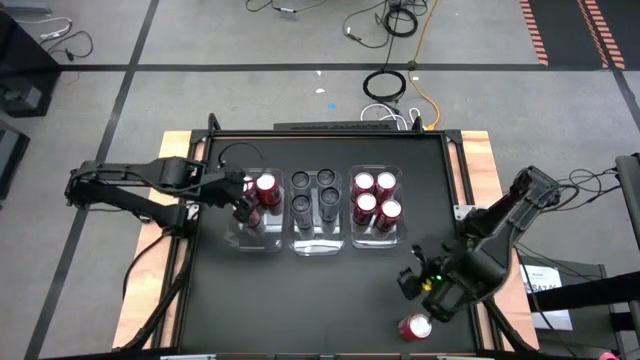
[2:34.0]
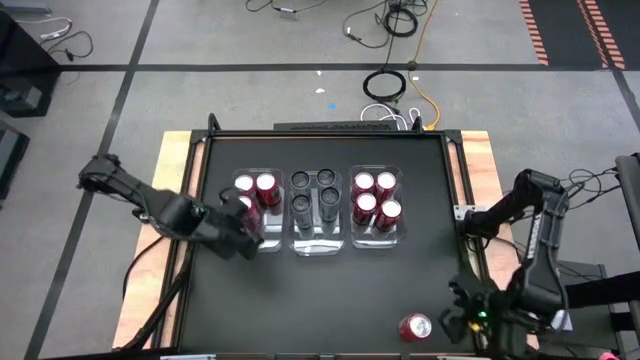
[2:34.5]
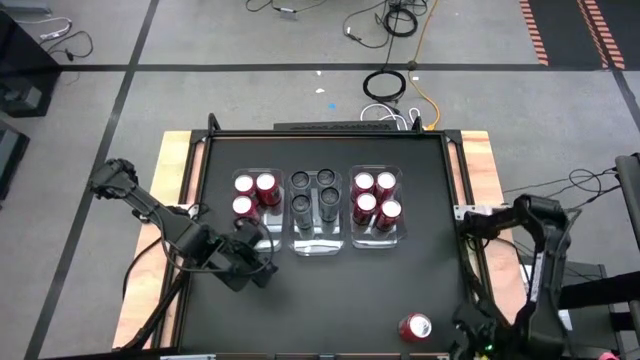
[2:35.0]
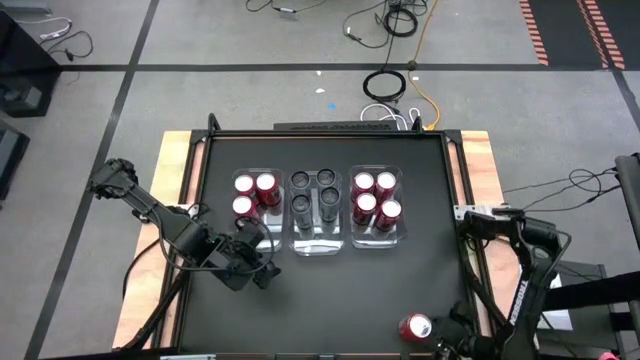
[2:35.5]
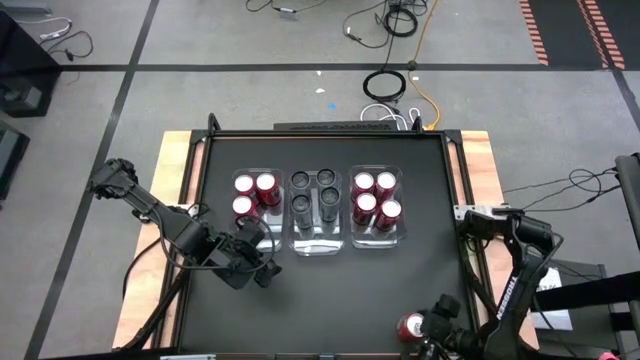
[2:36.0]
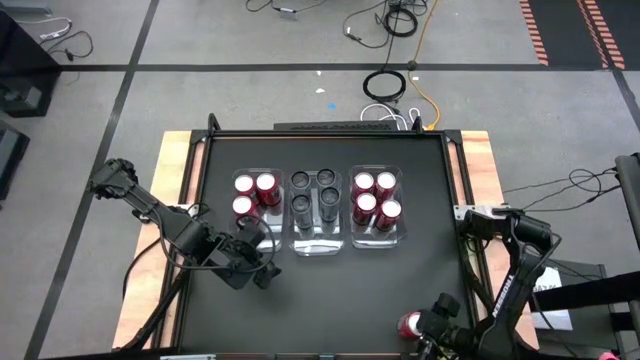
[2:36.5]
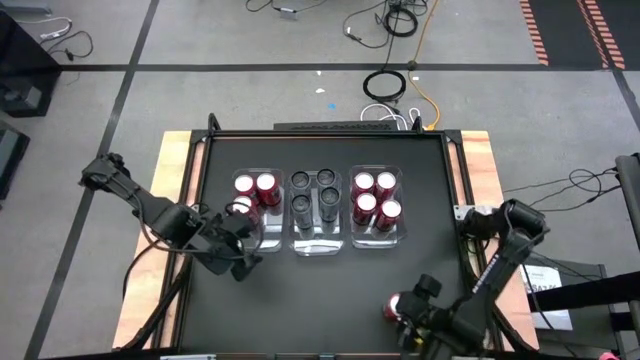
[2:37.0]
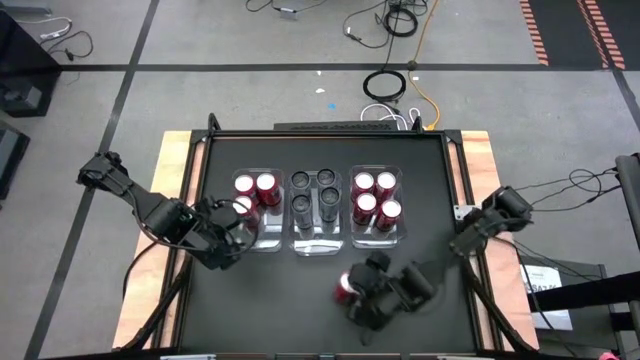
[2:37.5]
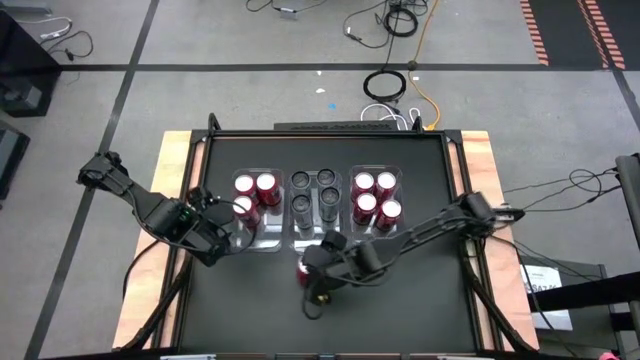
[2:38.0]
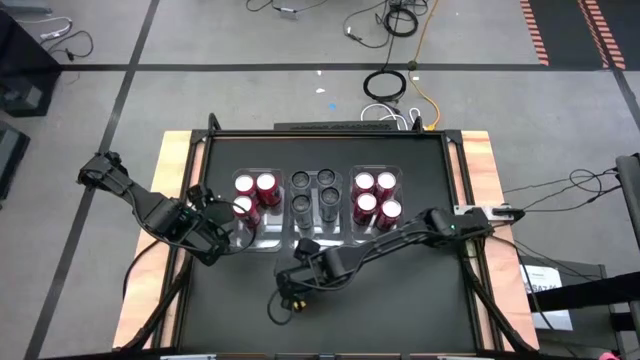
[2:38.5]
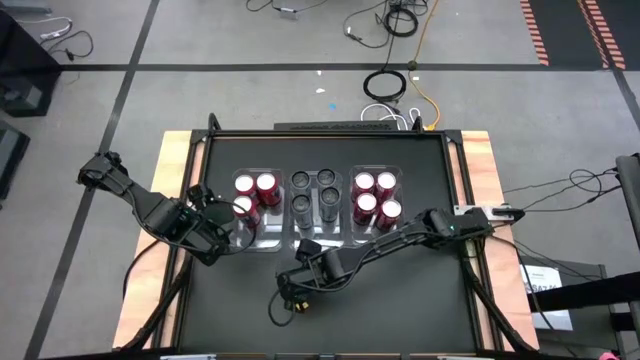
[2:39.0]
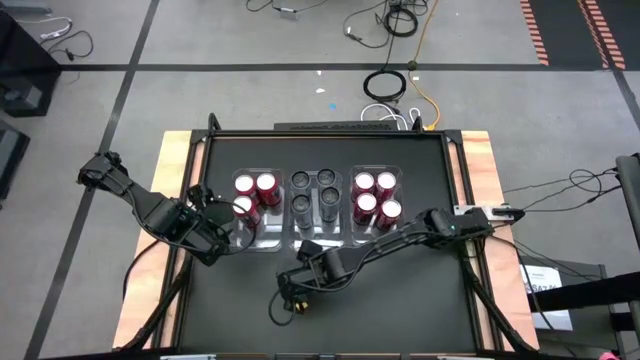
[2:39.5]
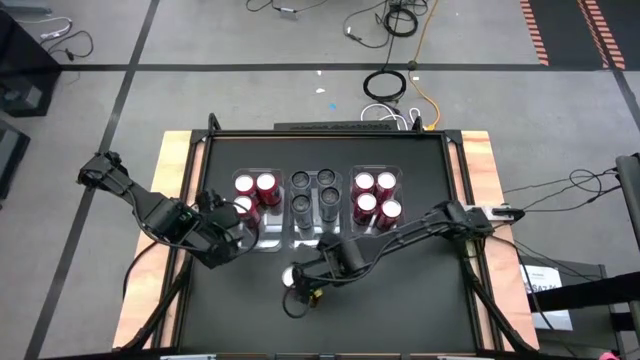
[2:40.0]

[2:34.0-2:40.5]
Task: Sort soda cans
Move the orange soda can to the center of the table

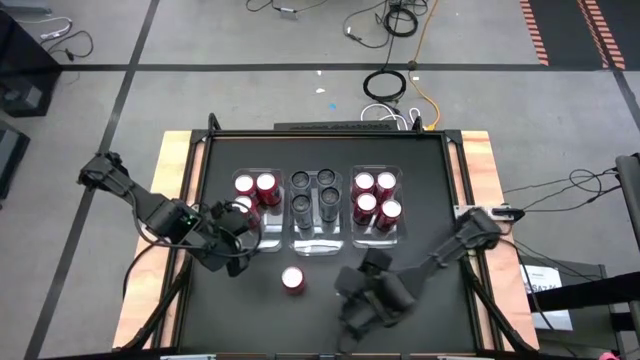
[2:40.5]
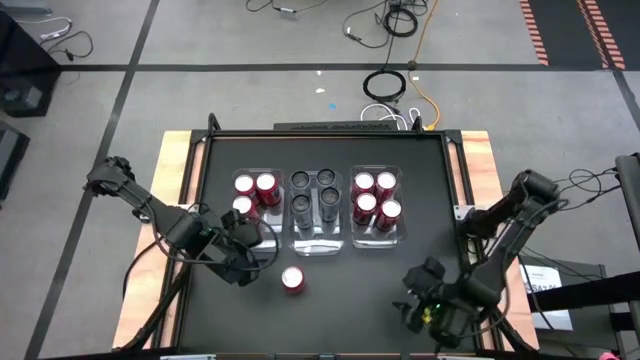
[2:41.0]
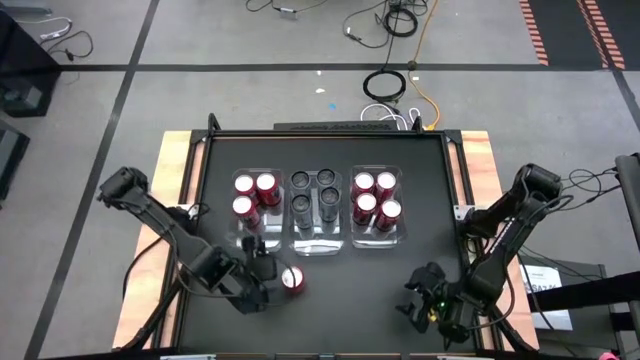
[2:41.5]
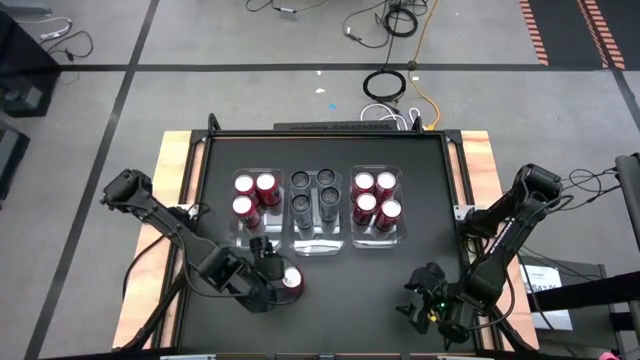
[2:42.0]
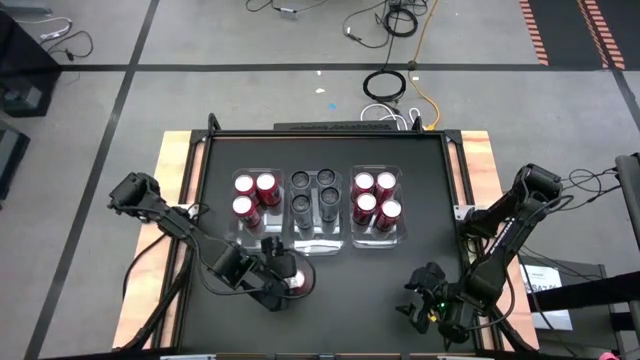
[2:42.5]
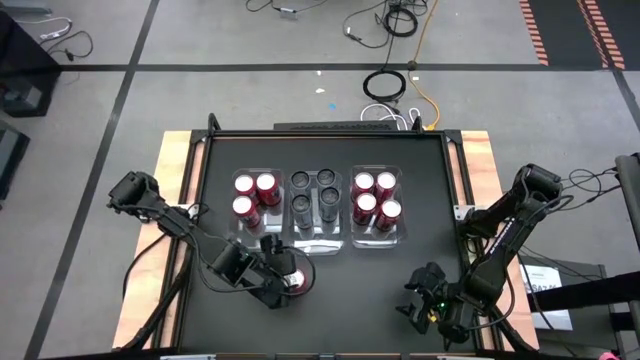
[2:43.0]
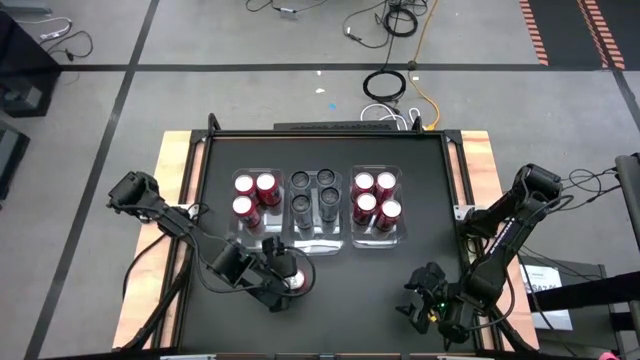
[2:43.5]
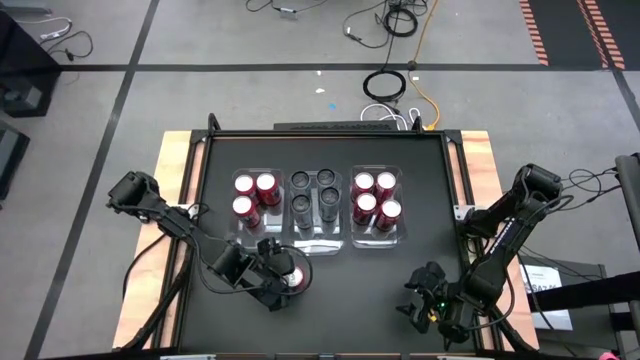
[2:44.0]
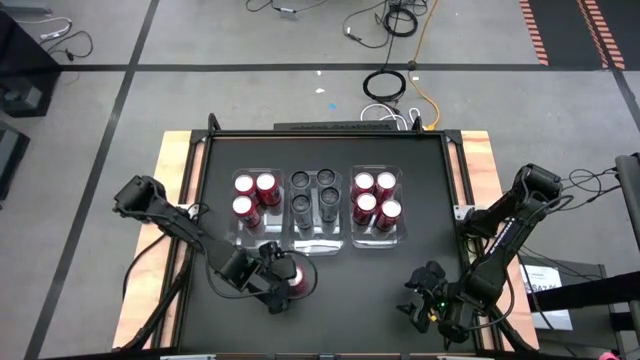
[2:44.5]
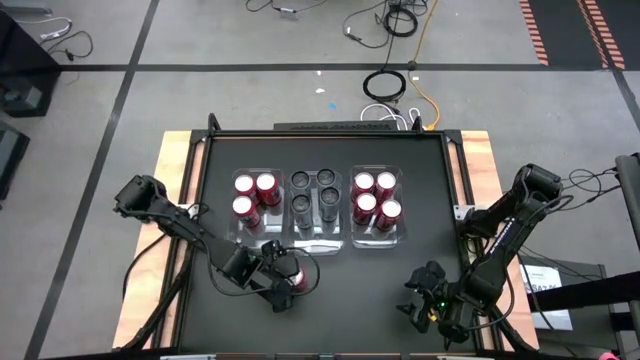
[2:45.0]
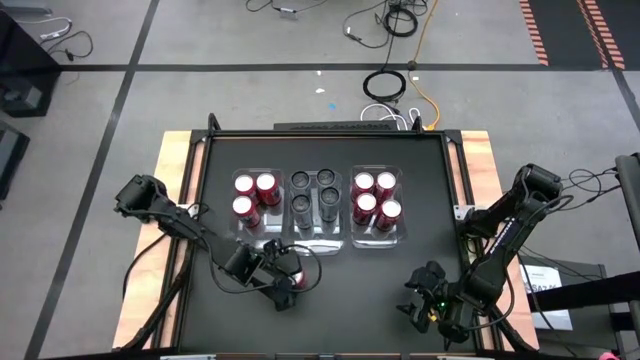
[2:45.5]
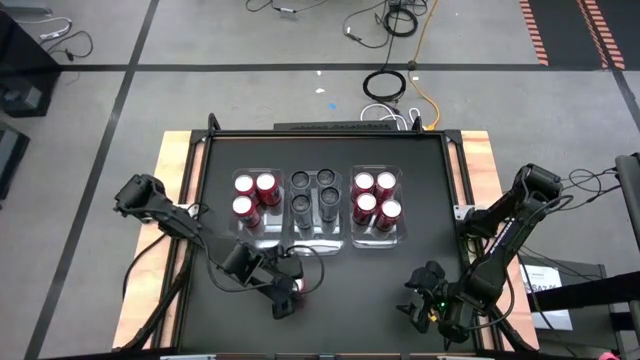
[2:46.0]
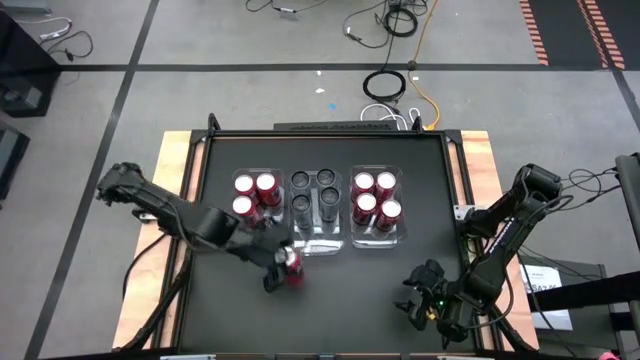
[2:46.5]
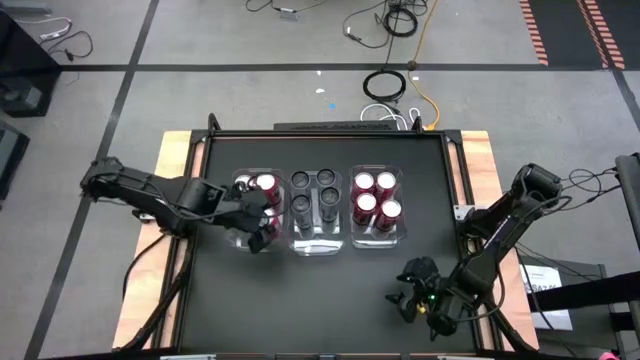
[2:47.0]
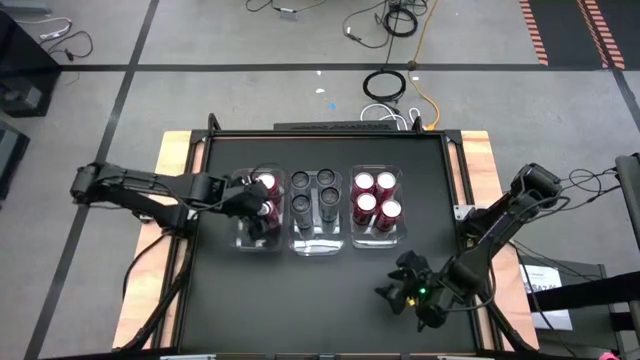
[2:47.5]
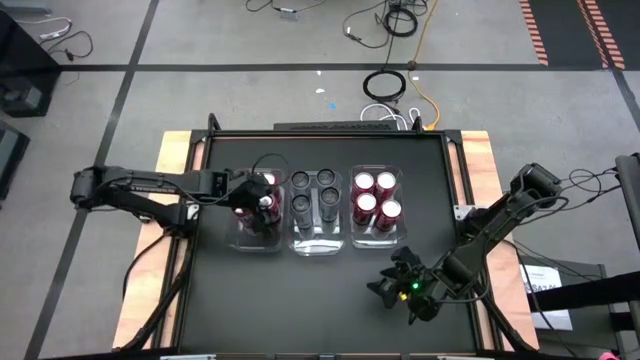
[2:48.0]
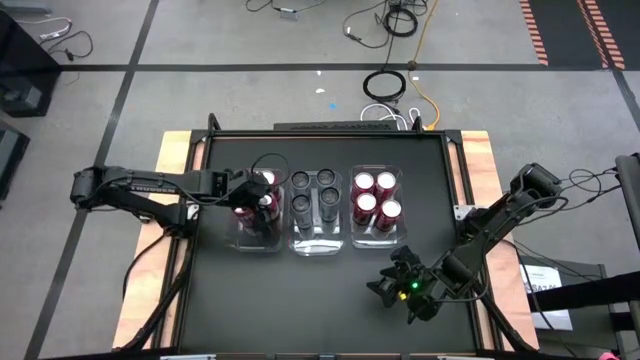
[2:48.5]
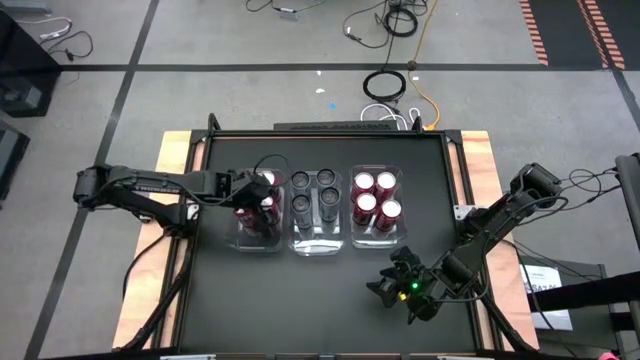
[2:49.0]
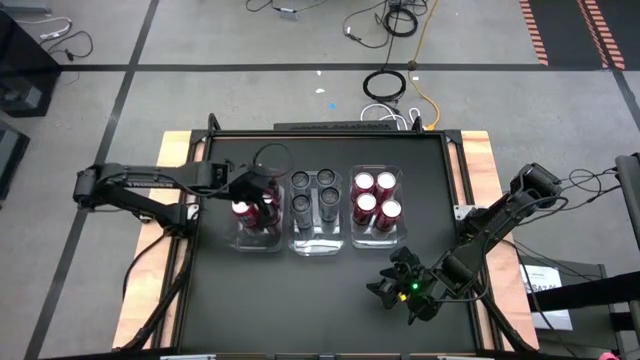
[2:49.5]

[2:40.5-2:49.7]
Put the orange soda can into the left transparent bin

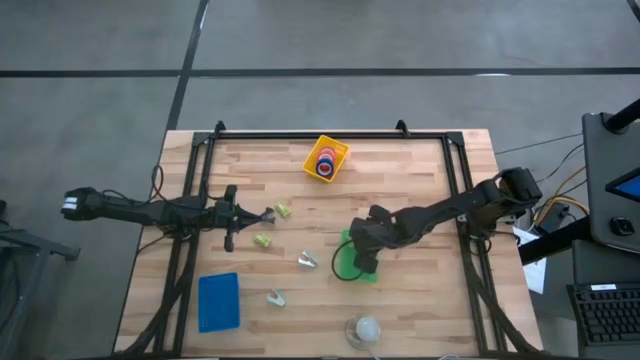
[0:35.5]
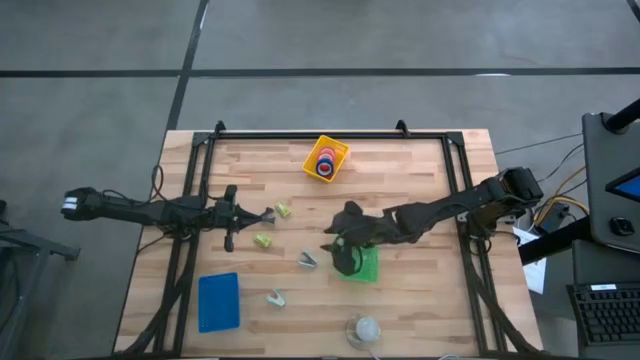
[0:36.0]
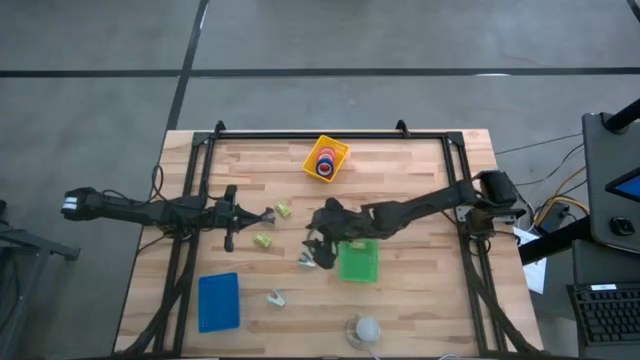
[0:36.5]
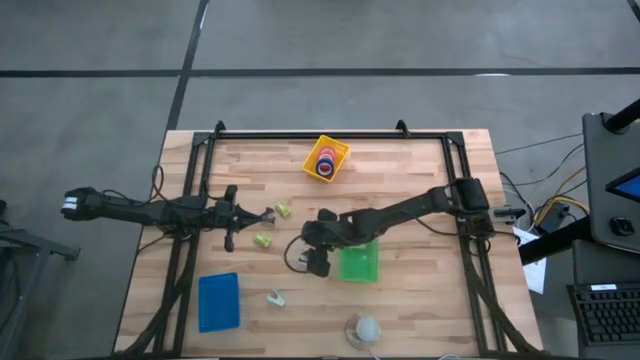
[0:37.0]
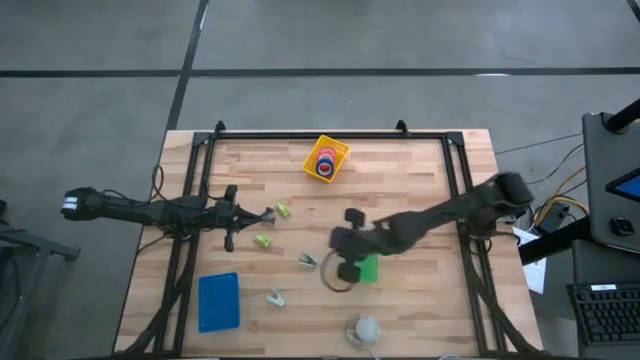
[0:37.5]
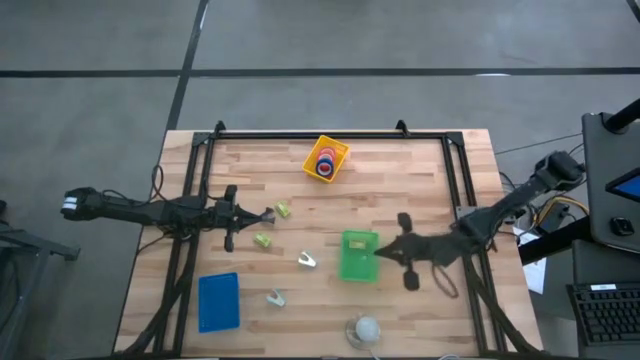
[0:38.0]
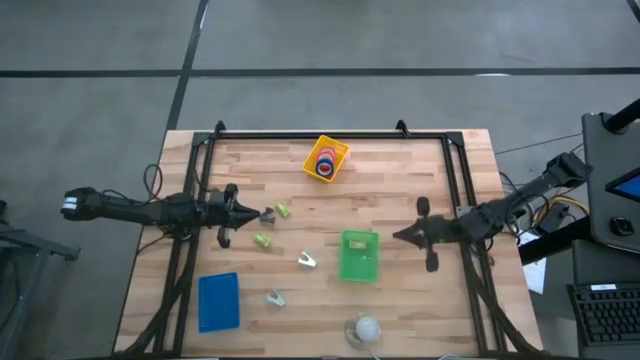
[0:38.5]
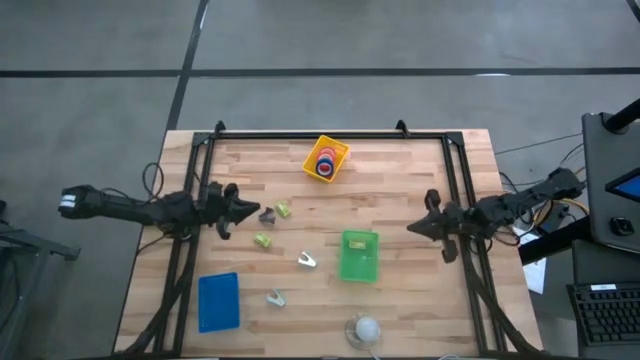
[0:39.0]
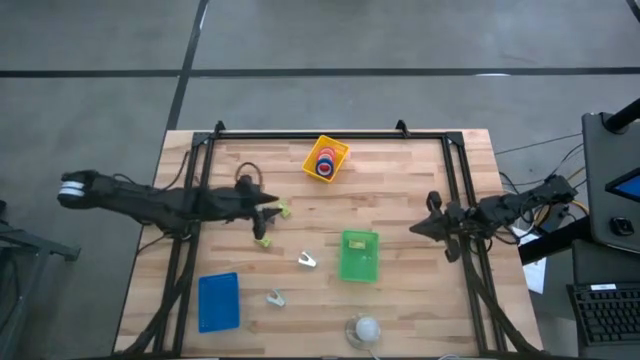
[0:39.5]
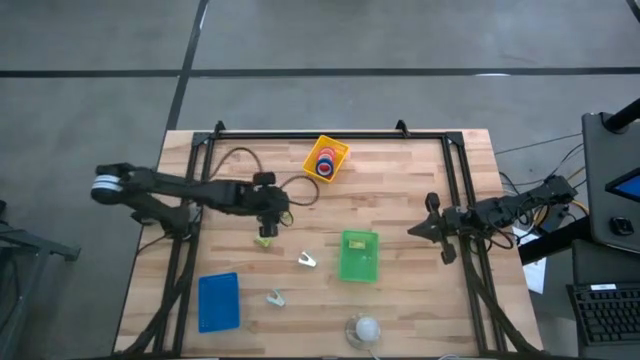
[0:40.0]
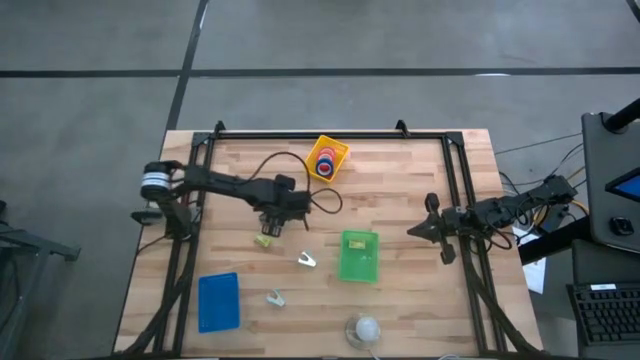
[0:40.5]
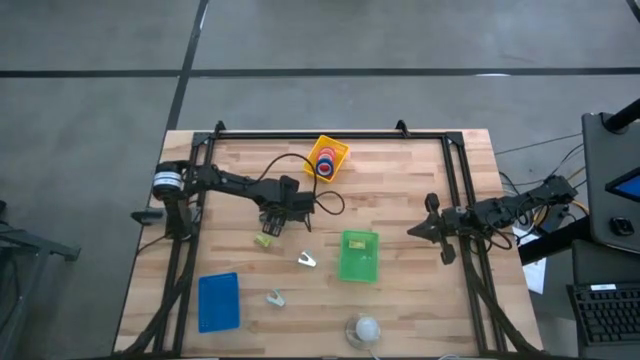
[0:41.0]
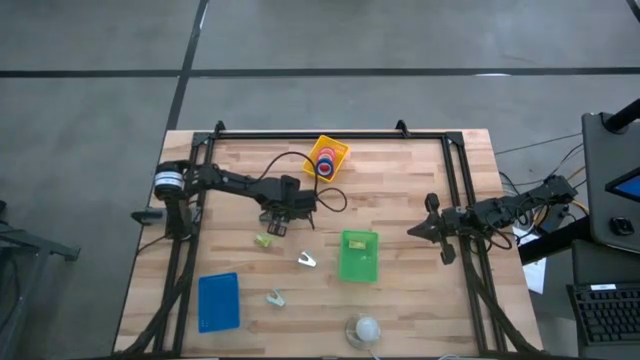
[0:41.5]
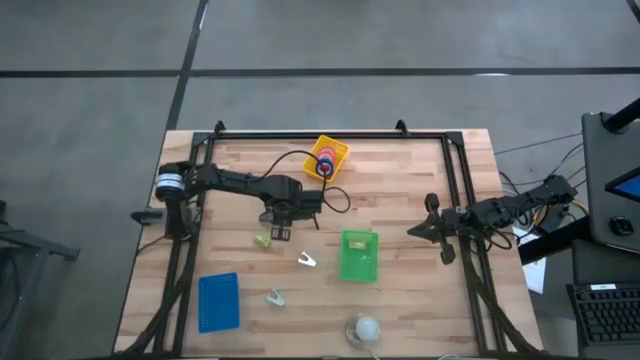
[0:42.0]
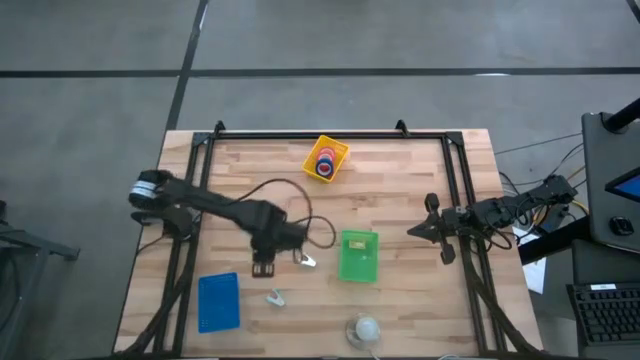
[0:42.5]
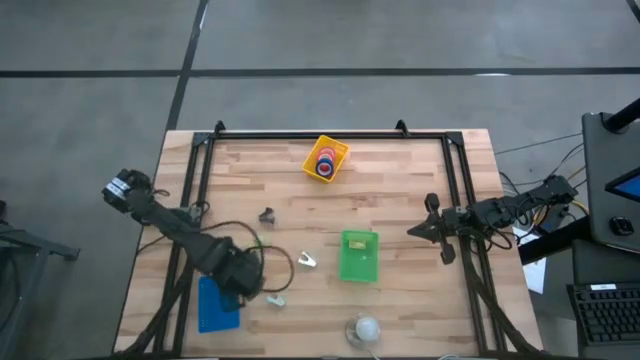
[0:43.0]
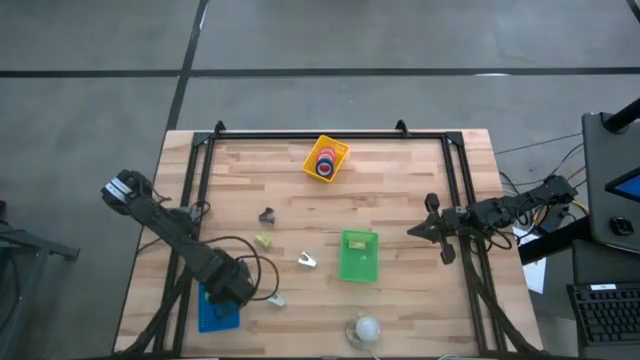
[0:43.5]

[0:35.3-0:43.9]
Task: Pick and place Stapler, Stapler remover, tape
Put the top green staple box into the green bin
